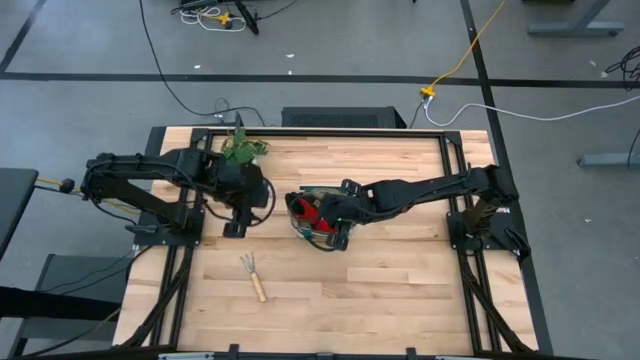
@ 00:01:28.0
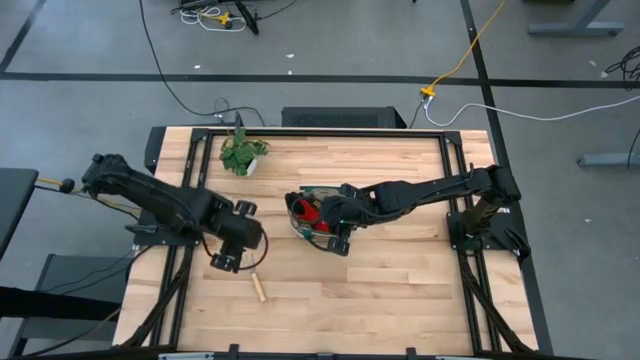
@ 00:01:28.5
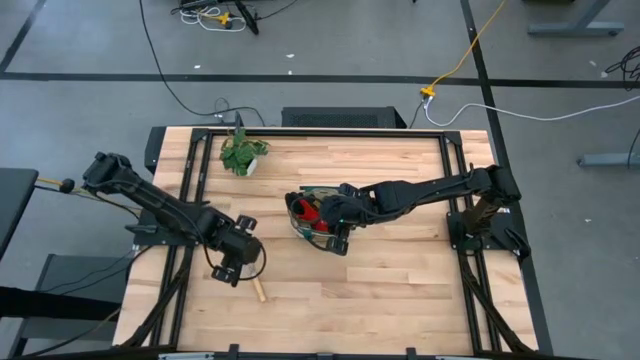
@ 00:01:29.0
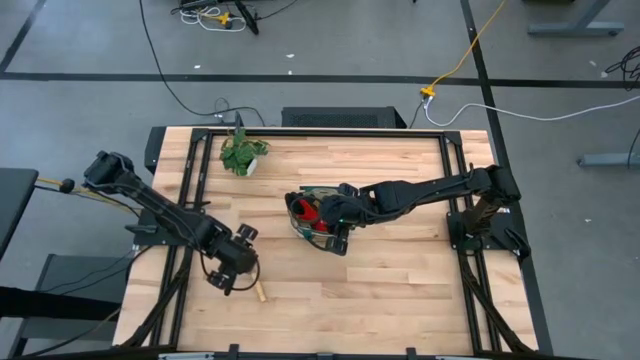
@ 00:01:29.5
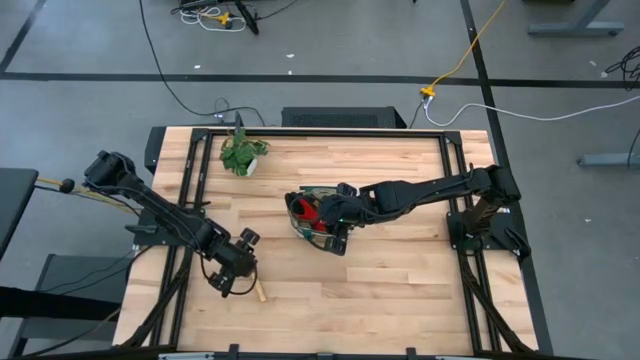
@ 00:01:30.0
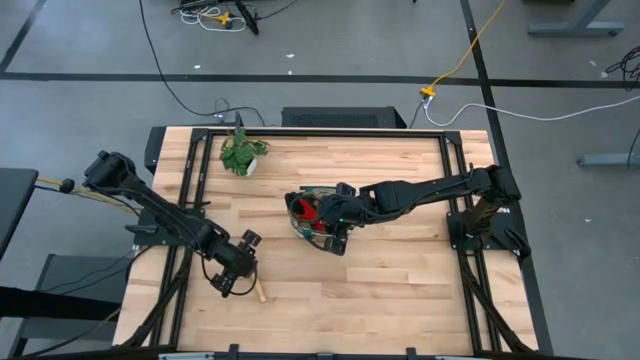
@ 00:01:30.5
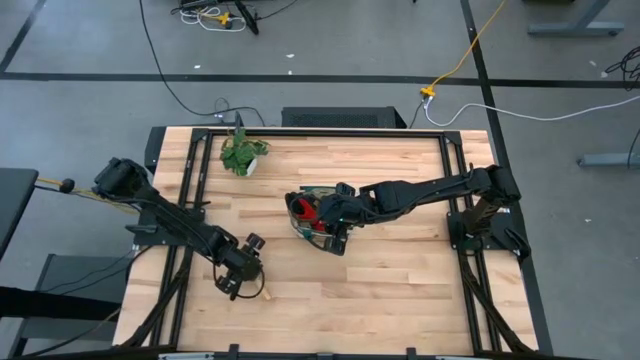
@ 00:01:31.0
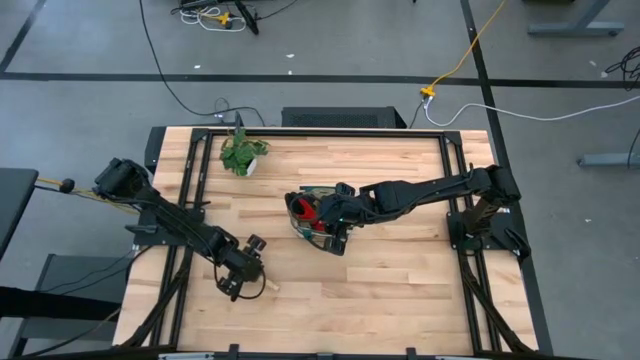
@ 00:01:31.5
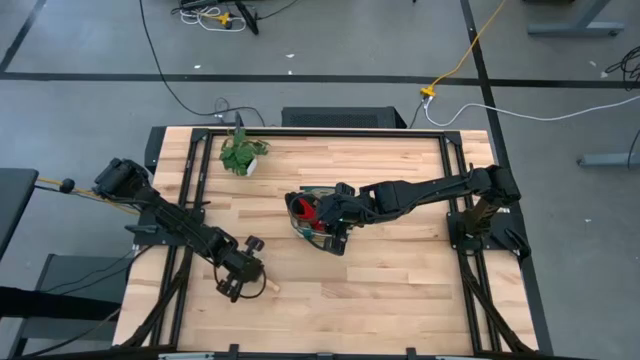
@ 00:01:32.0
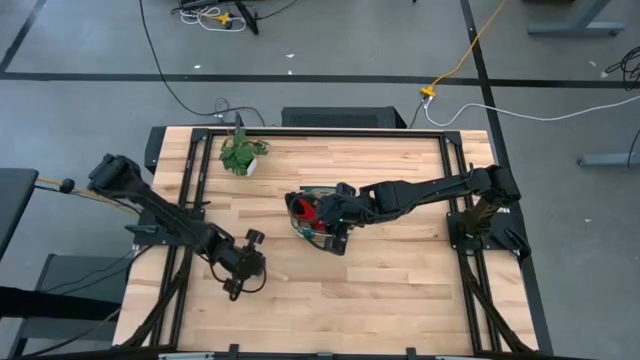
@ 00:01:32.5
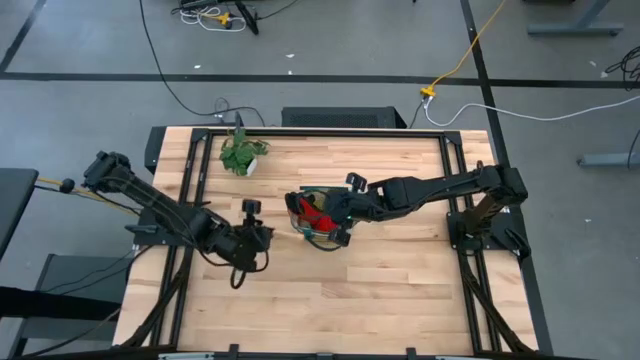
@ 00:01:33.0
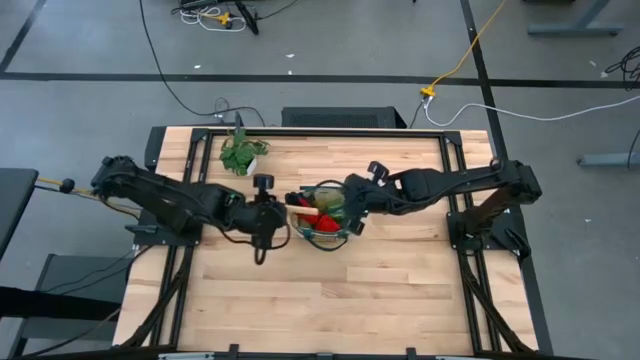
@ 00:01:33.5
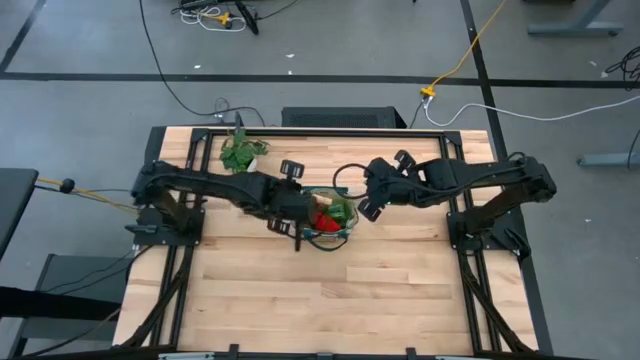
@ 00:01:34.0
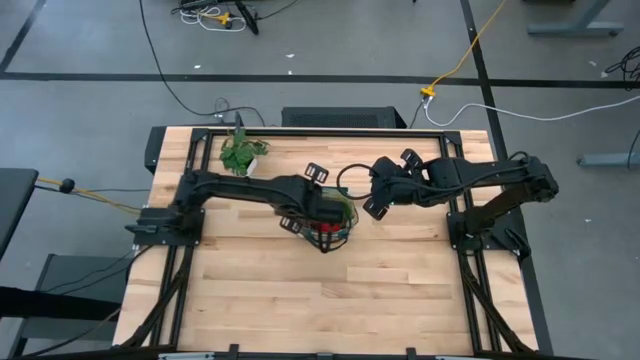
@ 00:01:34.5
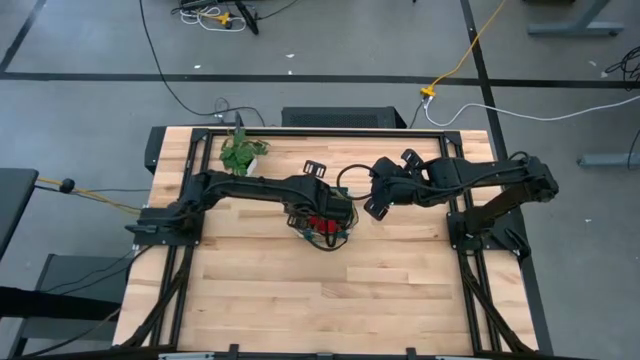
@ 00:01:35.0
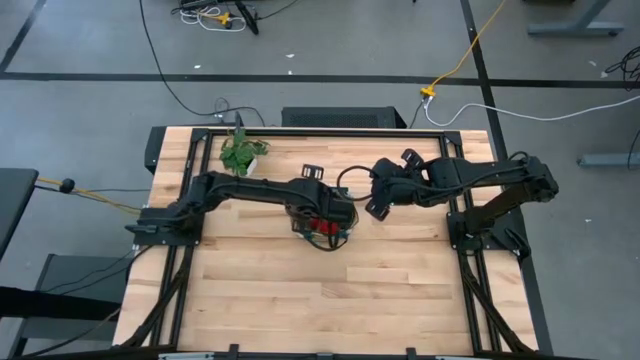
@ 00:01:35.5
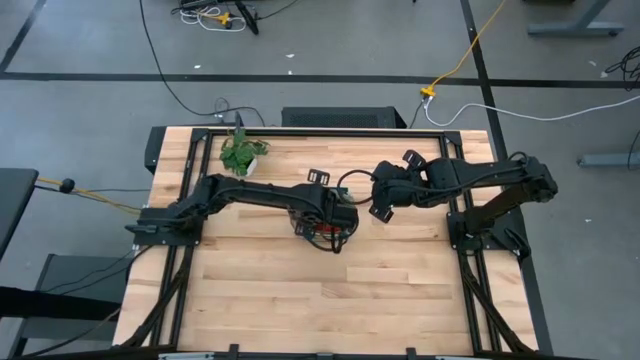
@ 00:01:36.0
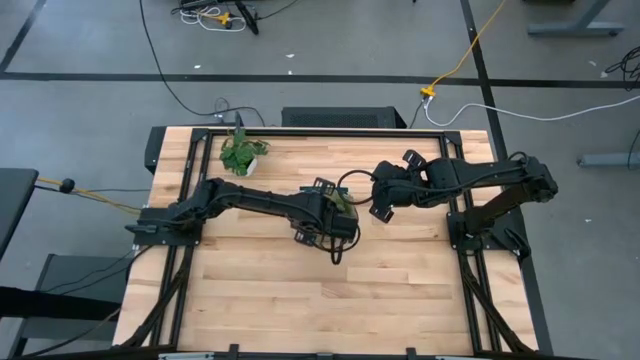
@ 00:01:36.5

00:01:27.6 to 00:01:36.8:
Task: Pick & Place Garden tools in Gardening bag
Put the brown hand rake into the white gardening bag

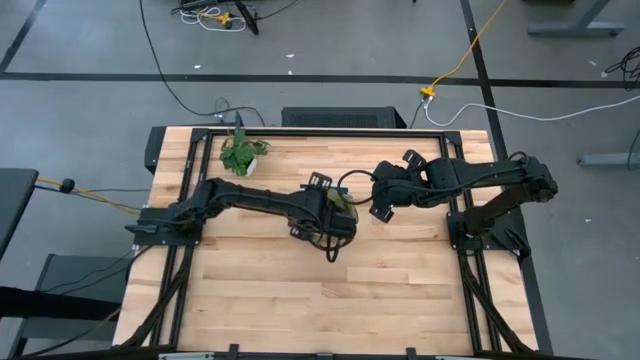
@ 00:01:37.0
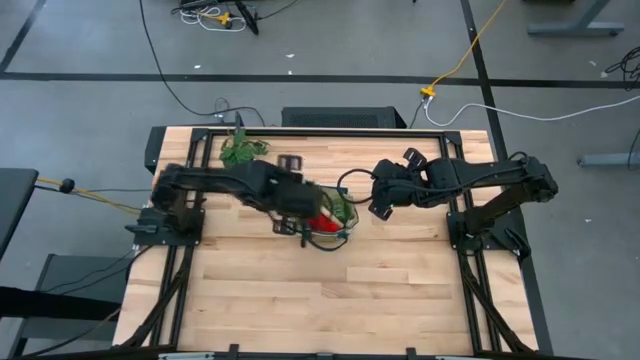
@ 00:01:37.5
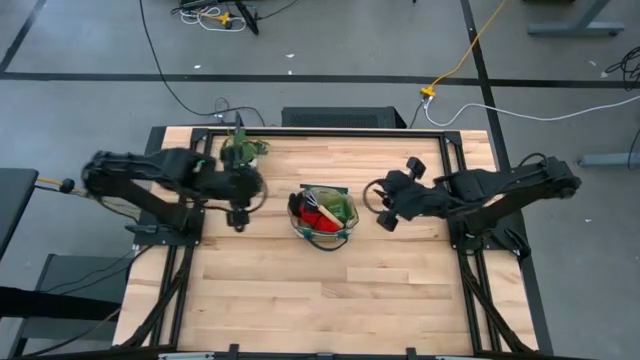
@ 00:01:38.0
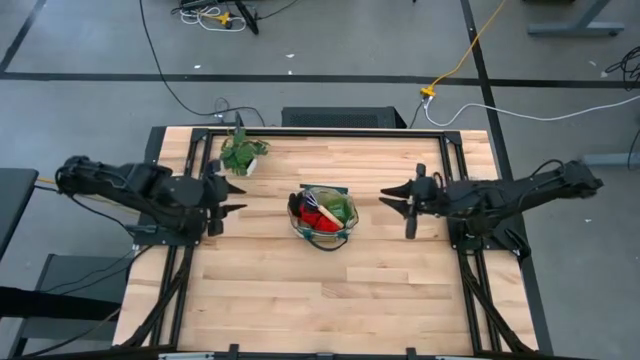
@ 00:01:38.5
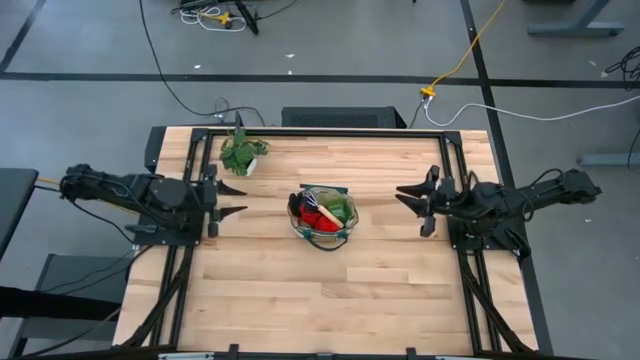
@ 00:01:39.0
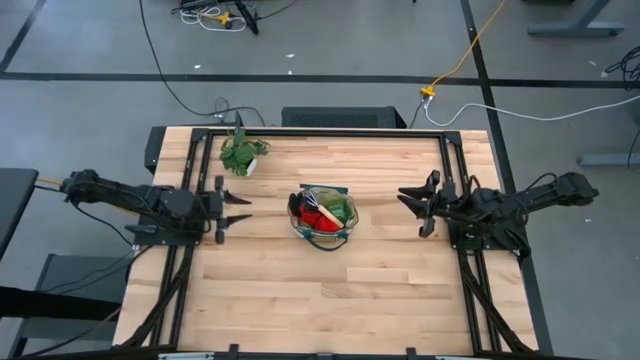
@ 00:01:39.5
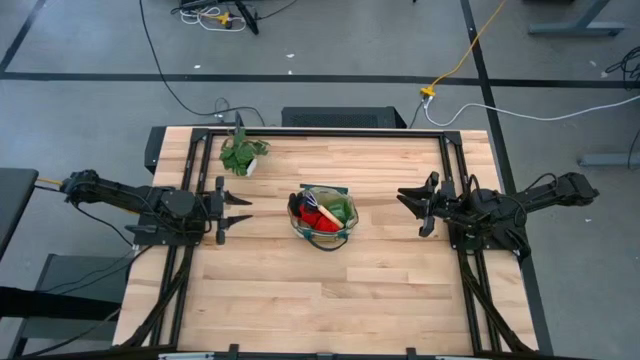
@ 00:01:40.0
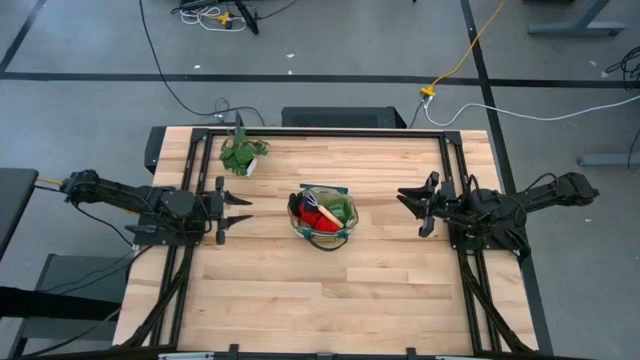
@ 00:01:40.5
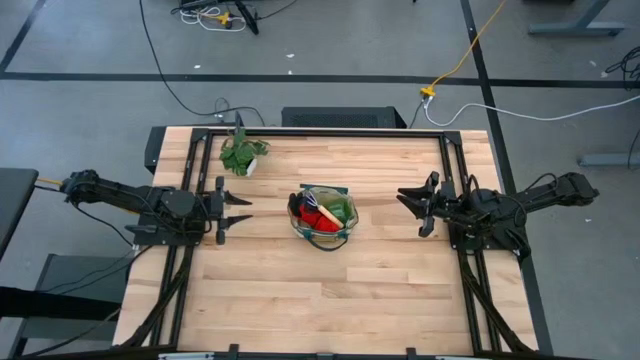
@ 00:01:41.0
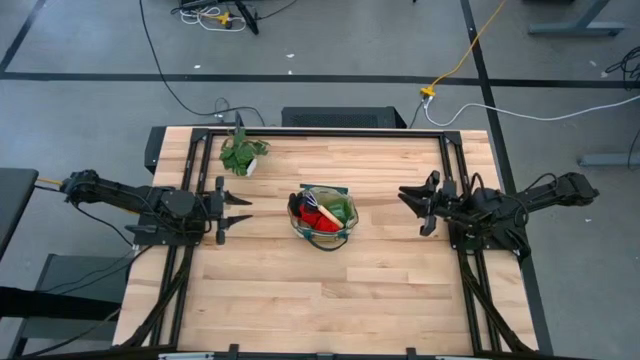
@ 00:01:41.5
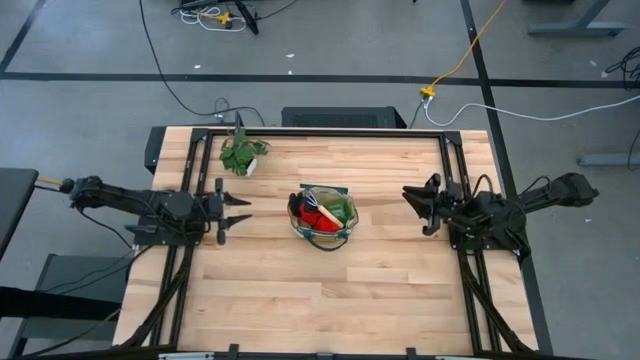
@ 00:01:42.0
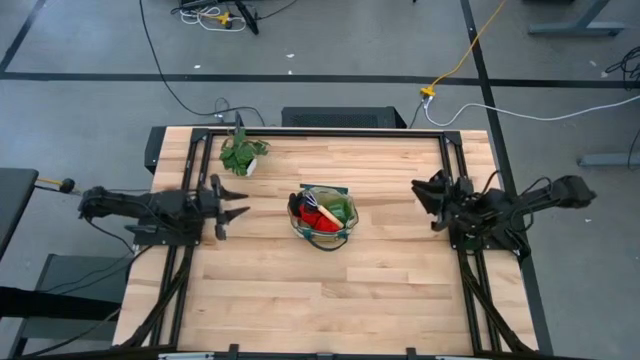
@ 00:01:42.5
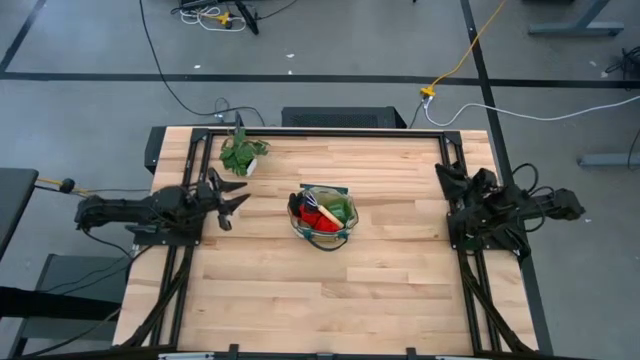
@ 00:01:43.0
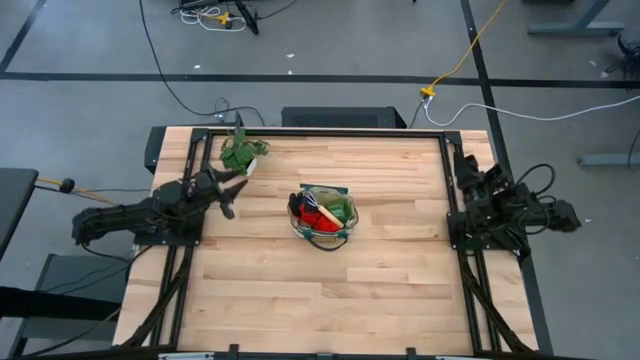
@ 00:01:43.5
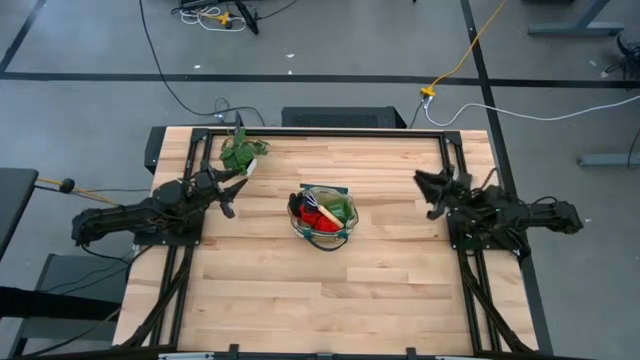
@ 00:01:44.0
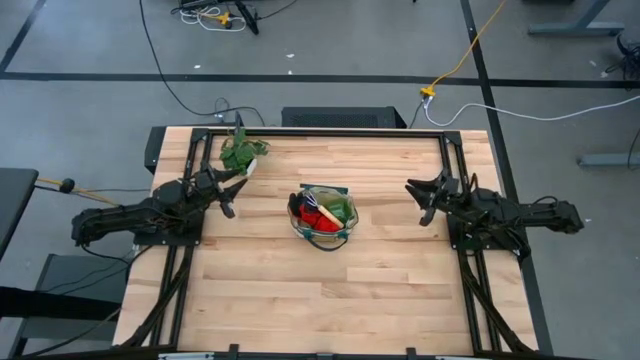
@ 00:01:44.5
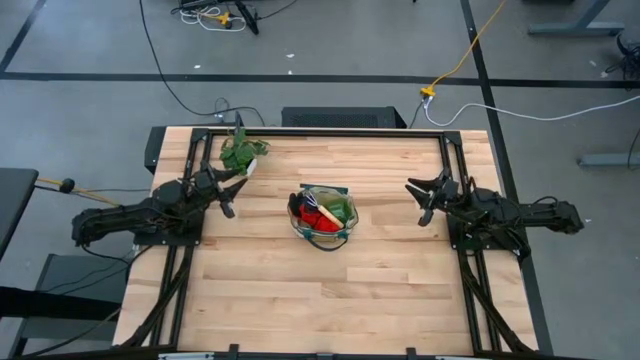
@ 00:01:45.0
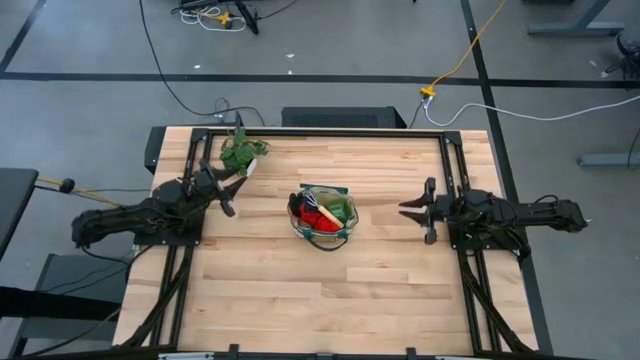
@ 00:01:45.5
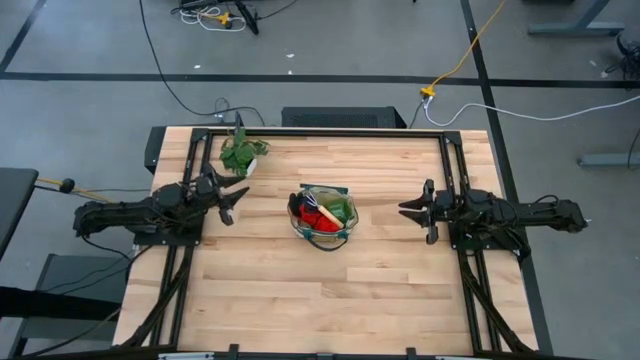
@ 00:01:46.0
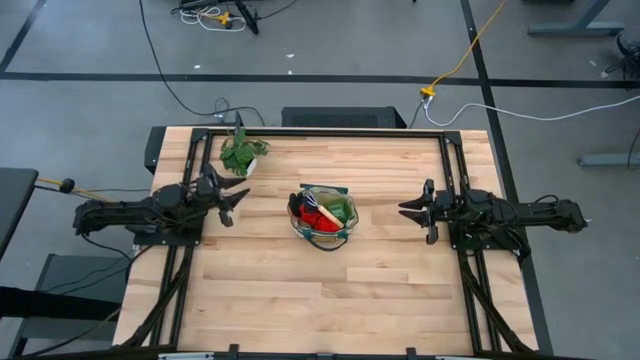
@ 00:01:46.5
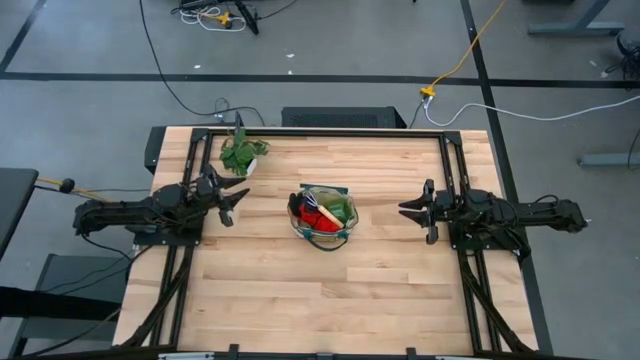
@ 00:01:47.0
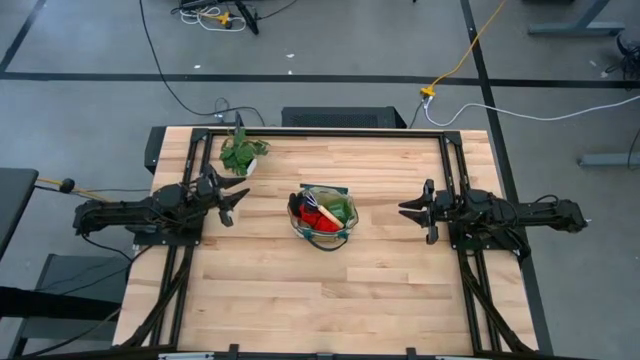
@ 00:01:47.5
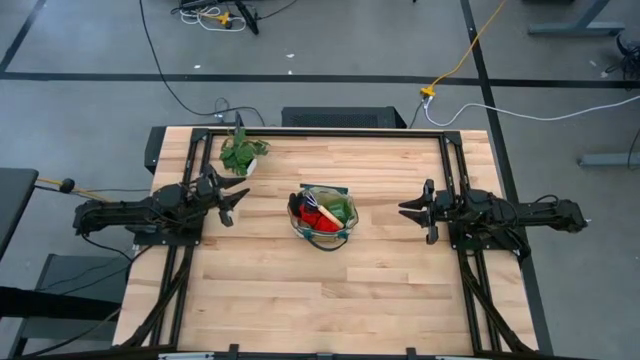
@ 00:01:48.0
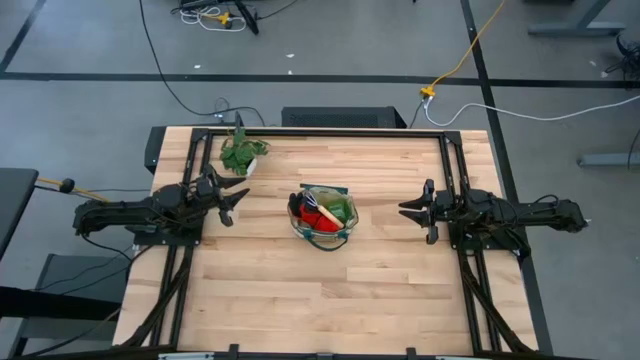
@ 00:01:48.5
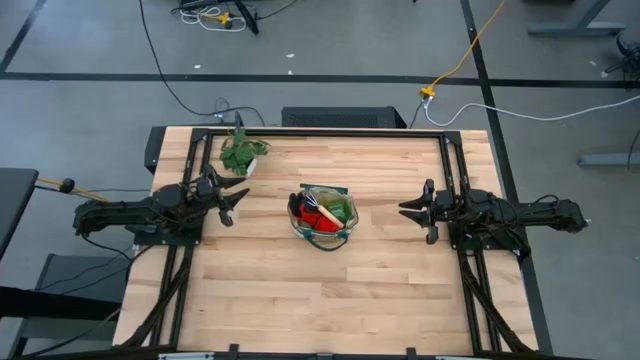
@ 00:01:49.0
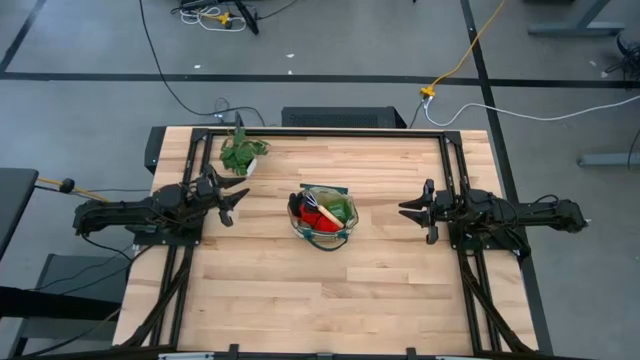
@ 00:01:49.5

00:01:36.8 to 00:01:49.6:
Return to Home Position
